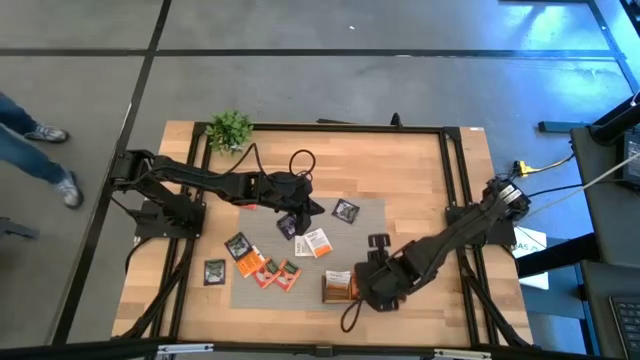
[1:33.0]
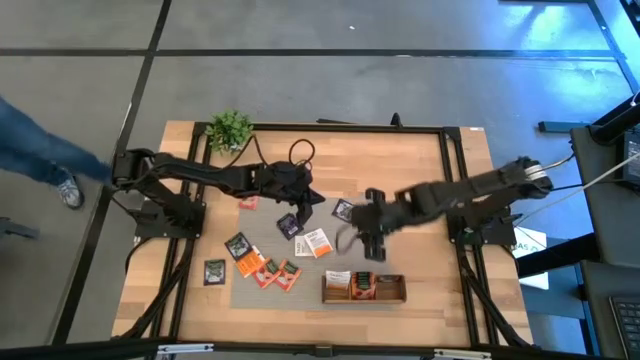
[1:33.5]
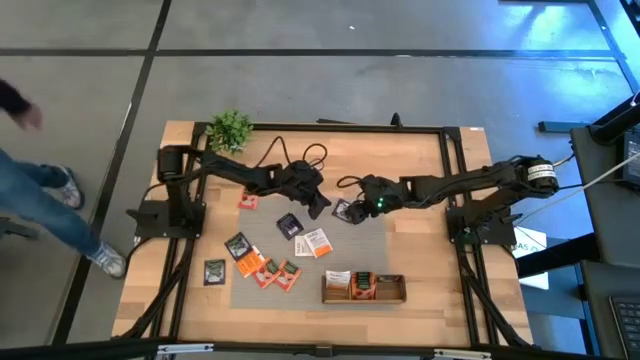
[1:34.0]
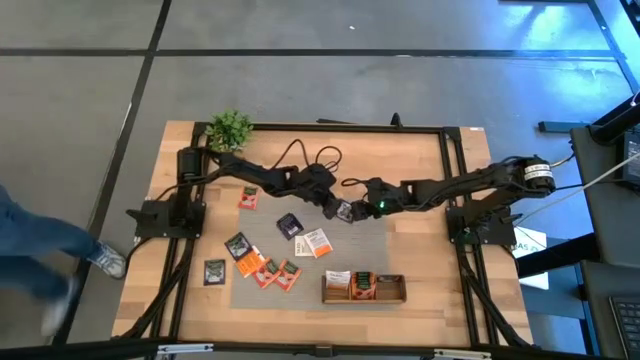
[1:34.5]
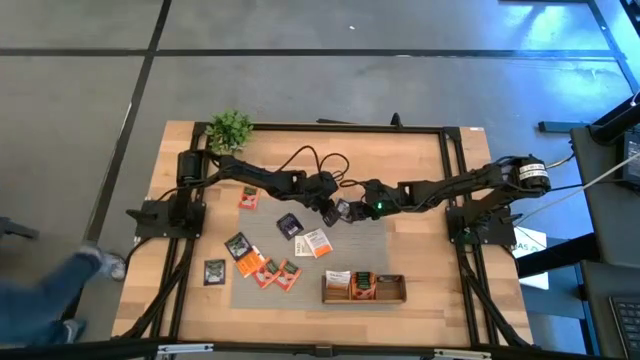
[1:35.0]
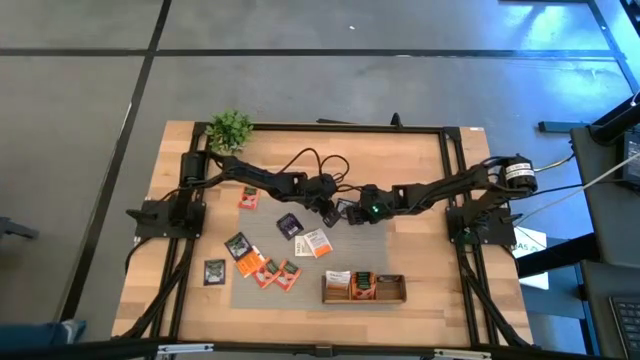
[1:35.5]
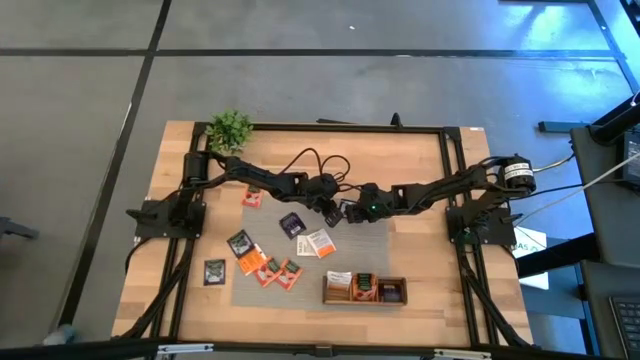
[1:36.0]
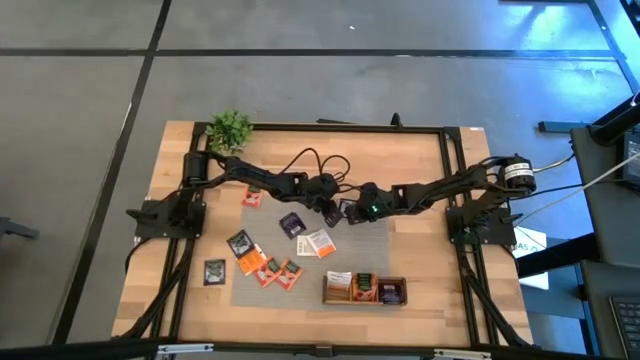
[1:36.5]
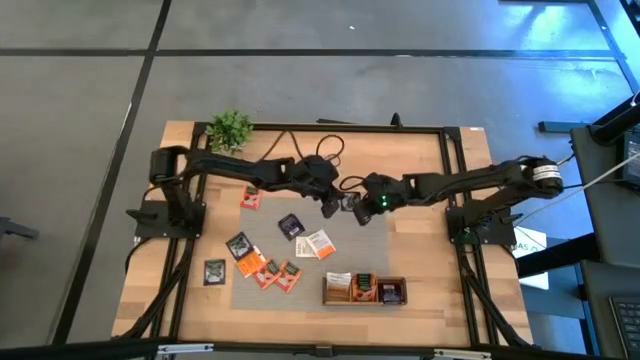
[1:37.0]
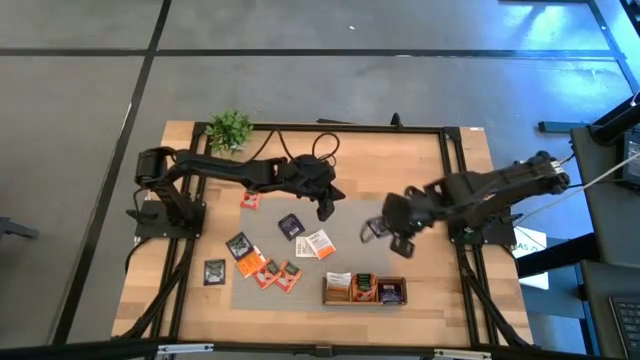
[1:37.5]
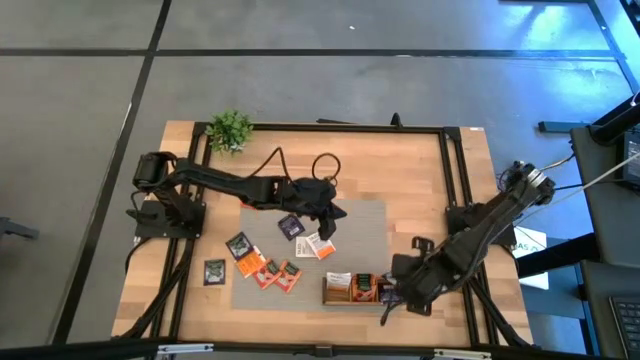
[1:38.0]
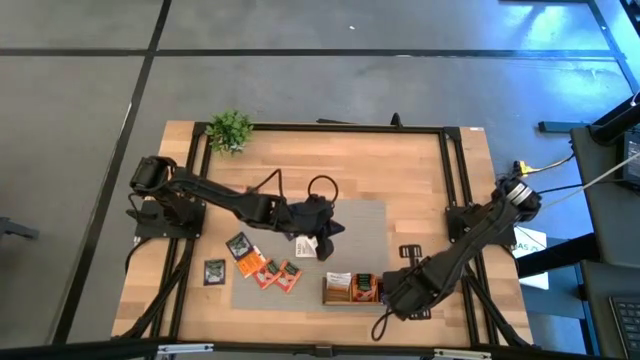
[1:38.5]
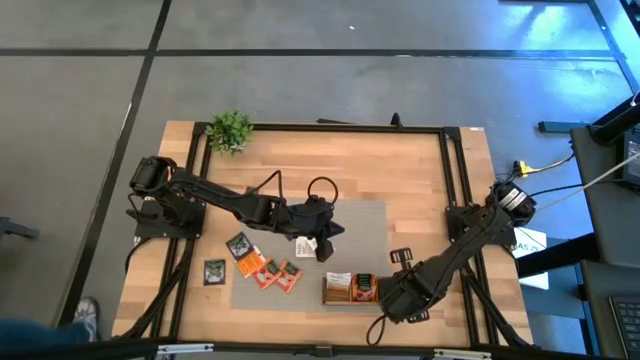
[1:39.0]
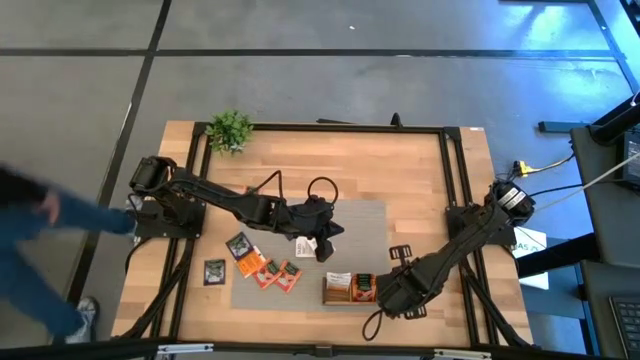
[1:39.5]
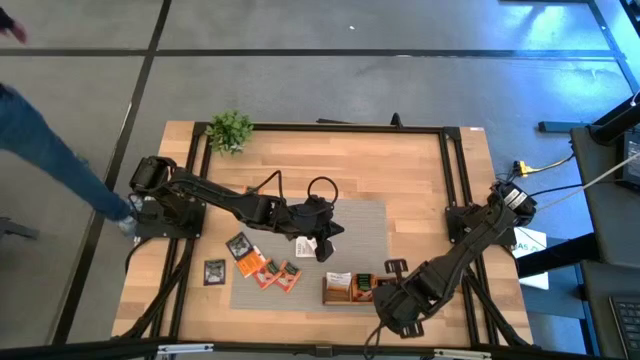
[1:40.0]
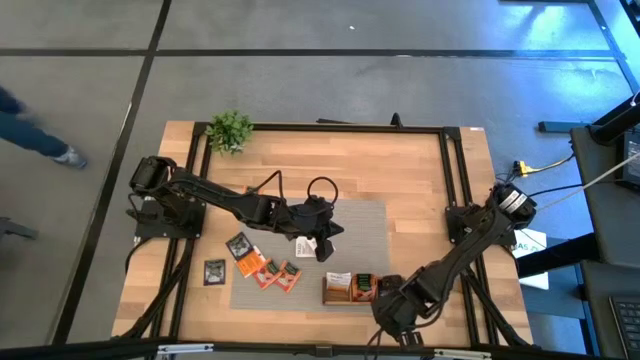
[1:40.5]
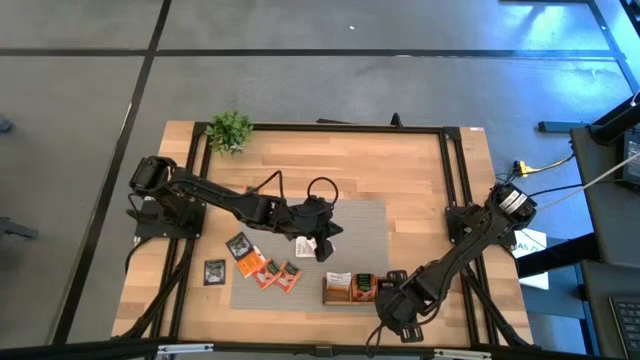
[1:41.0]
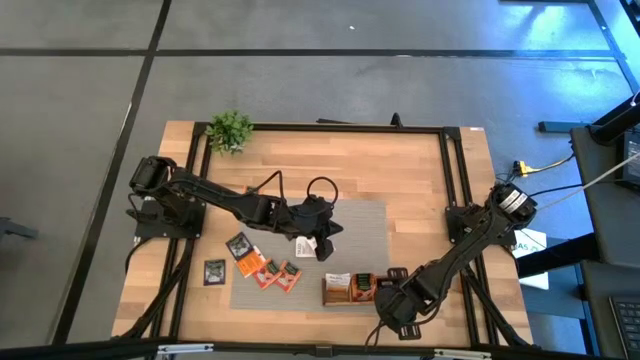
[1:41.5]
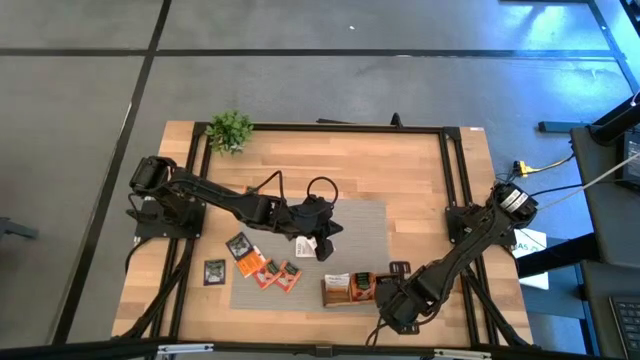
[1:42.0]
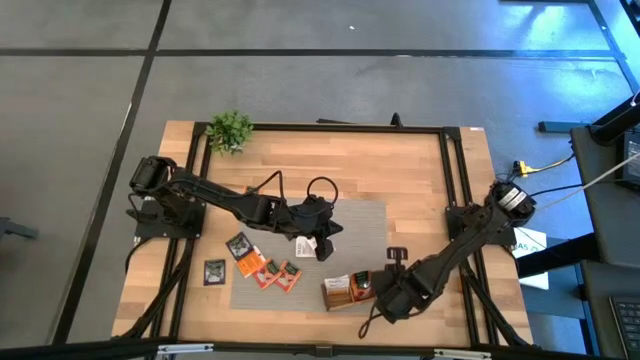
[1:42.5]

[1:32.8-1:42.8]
Task: Pick & Place Tea
Put the black tea bag into the right compartment of the wooden organizer

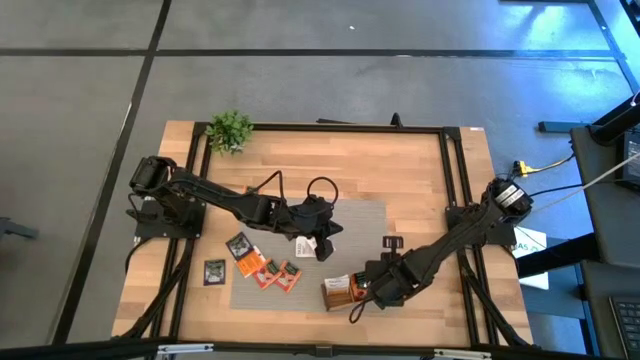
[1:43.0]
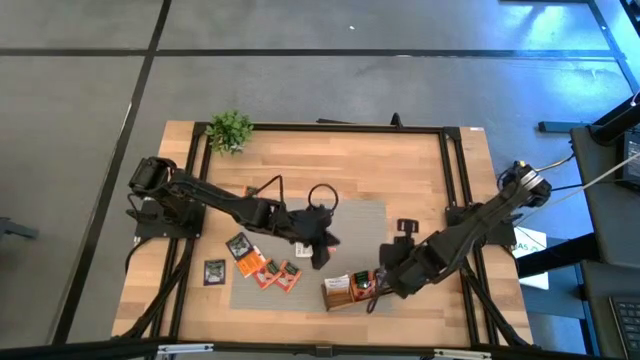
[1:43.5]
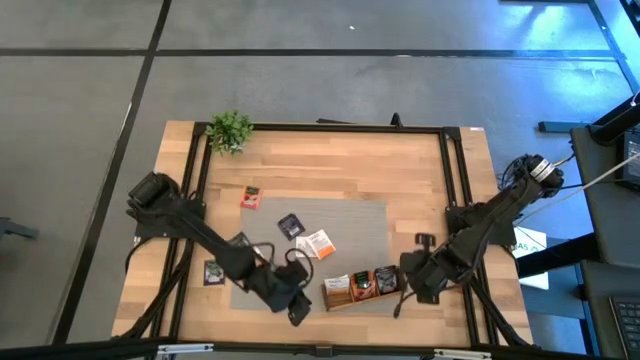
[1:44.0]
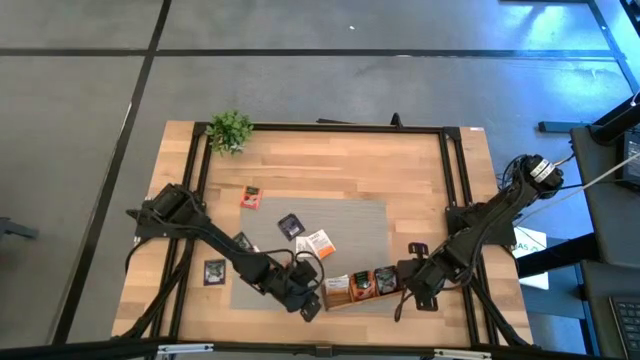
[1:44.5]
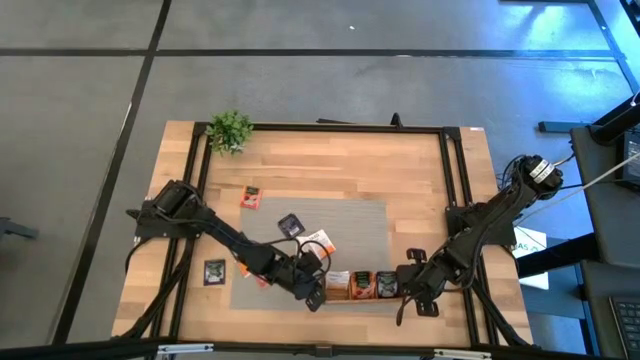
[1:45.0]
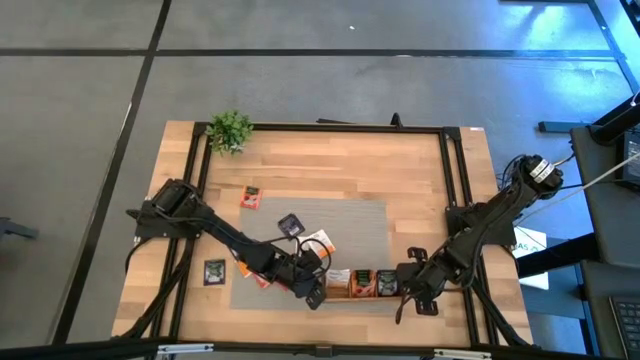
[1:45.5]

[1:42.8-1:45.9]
Adjust the wooden organizer on the table

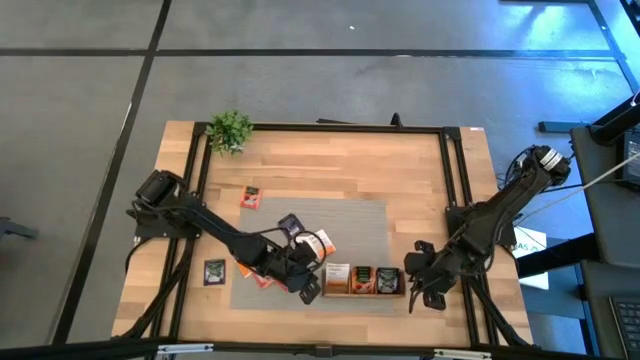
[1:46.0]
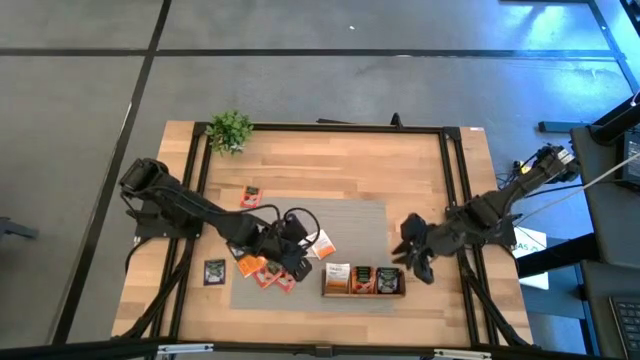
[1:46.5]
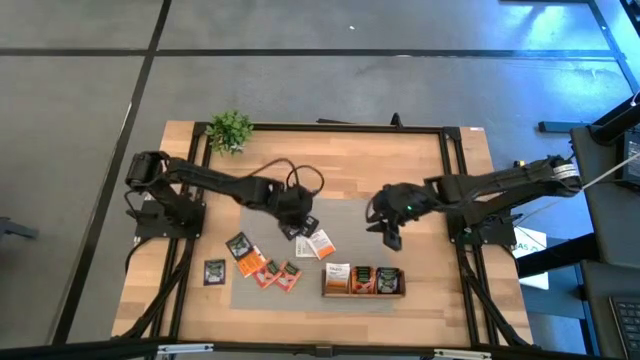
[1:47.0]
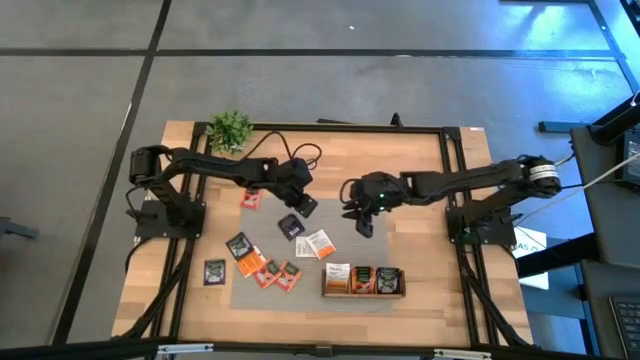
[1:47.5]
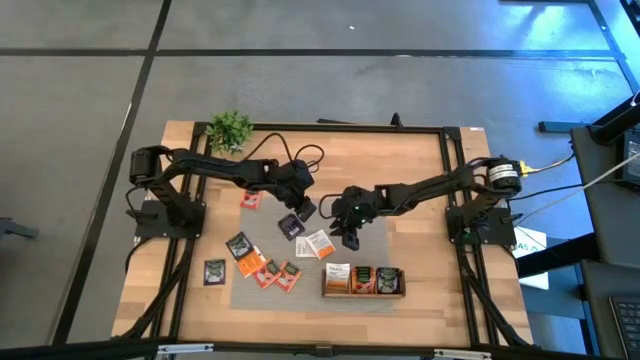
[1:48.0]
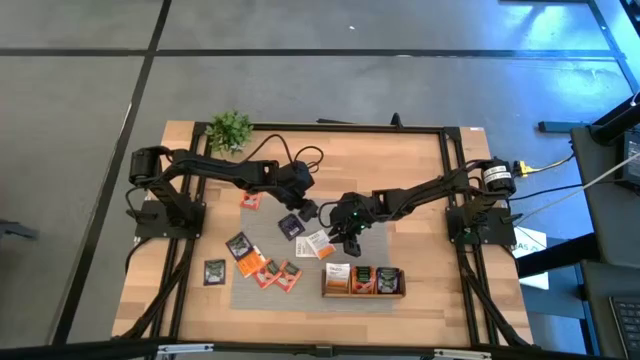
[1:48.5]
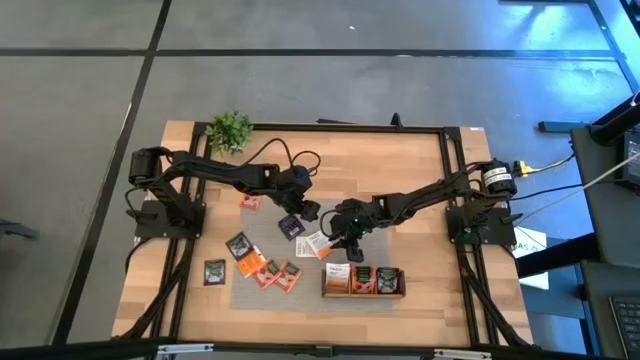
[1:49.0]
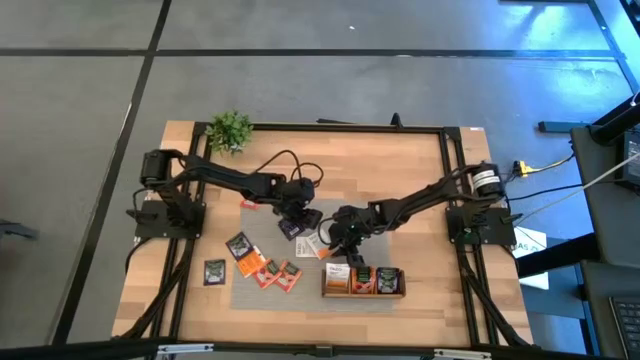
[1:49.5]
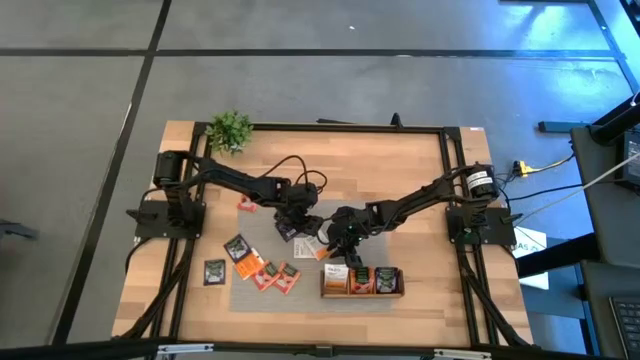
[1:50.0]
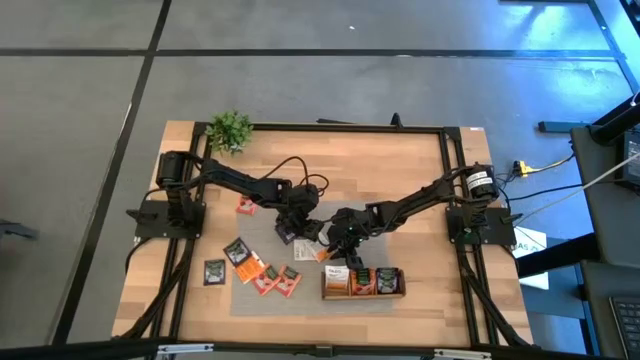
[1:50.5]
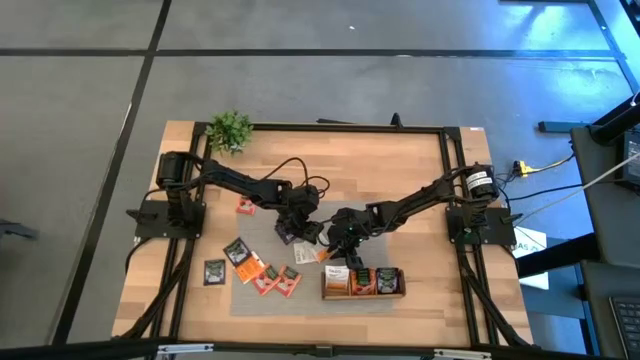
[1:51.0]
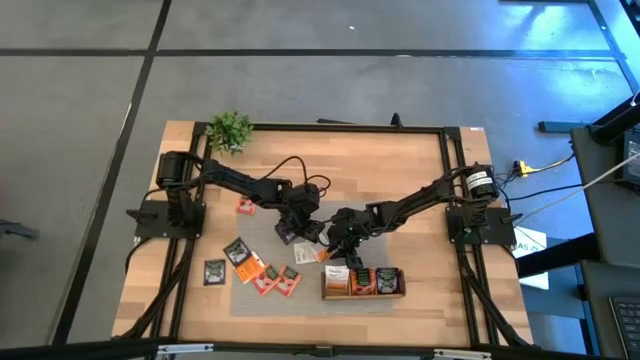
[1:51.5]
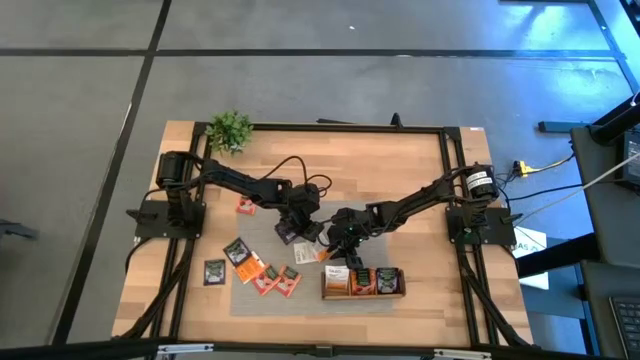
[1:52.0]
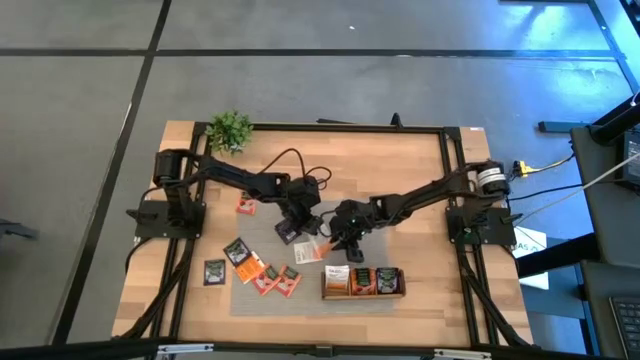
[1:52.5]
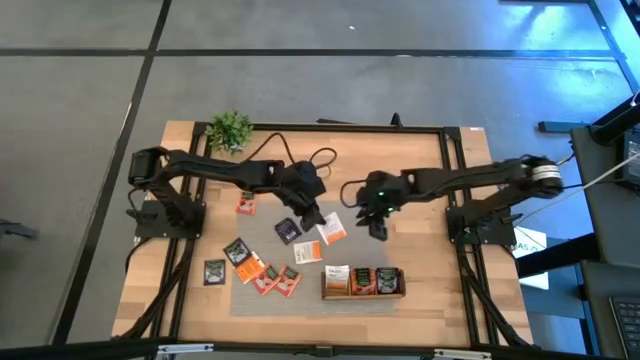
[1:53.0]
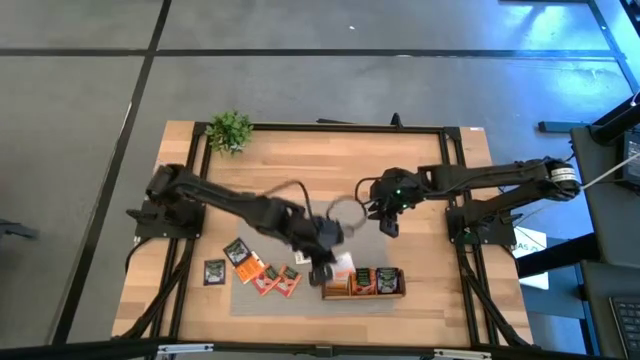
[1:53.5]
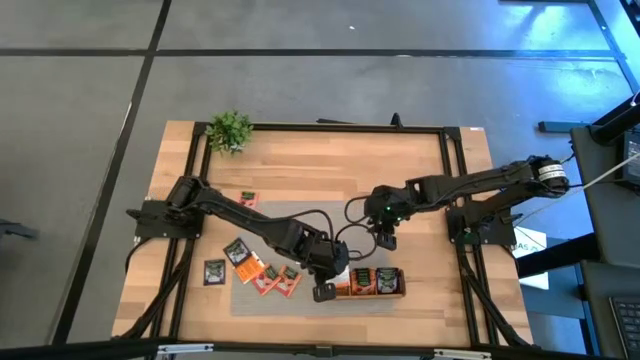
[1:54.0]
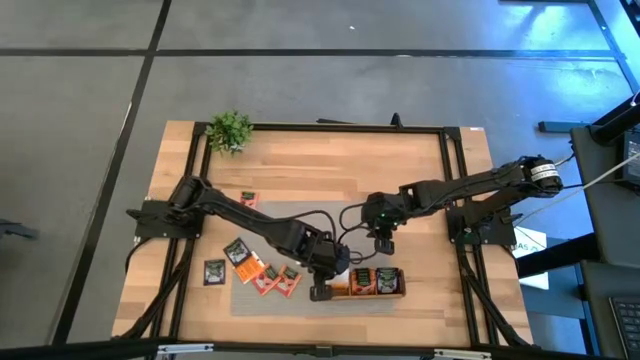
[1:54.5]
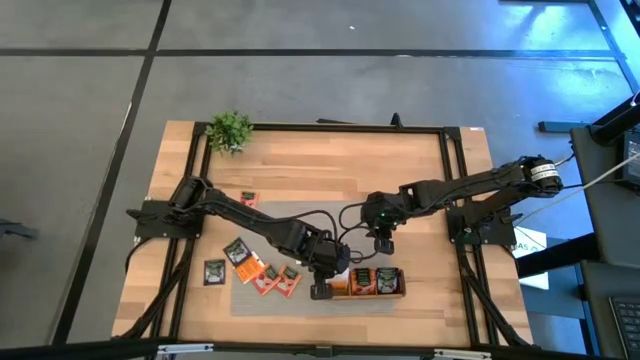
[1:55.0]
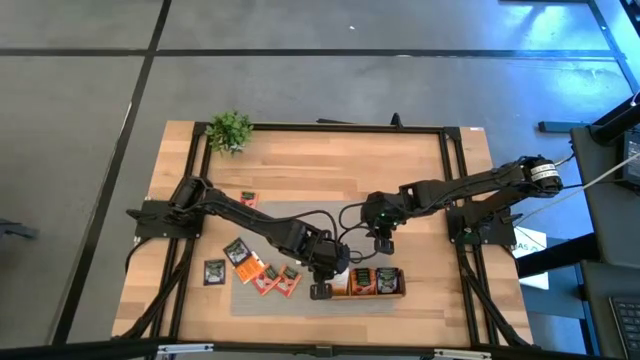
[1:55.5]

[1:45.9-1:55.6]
Put the top orange tea bag into the left compartment of the wooden organizer
